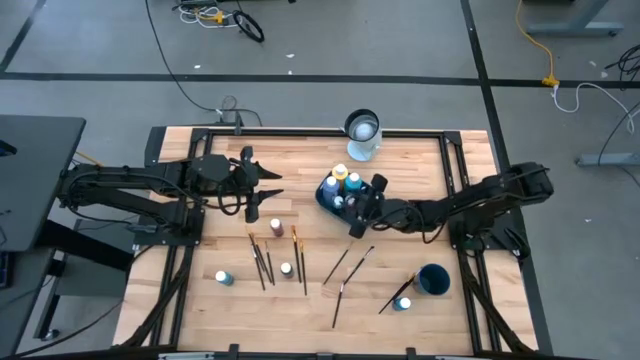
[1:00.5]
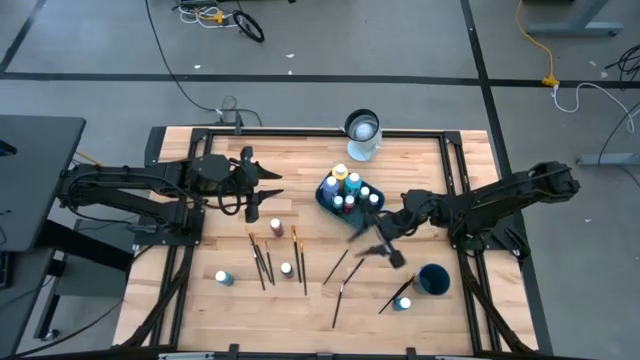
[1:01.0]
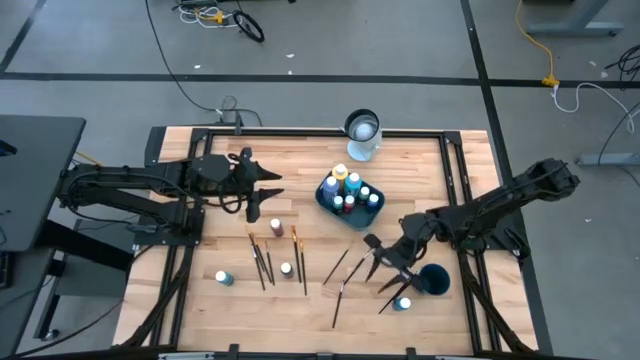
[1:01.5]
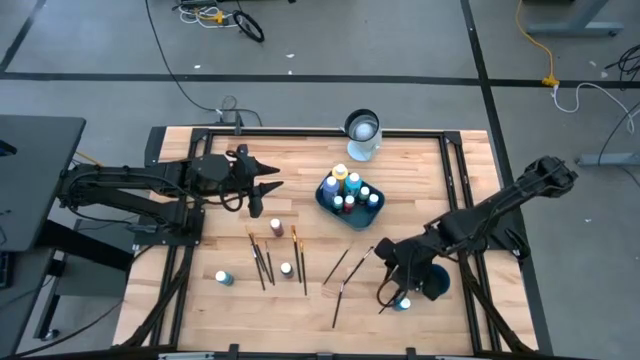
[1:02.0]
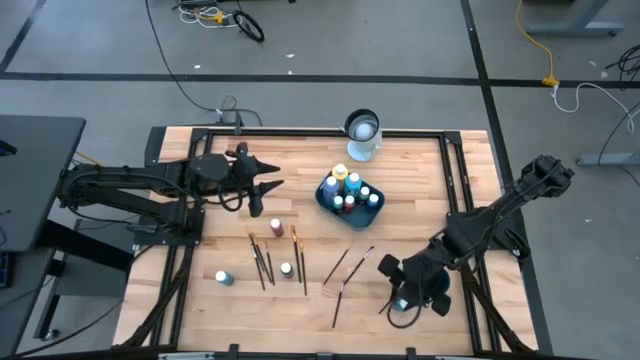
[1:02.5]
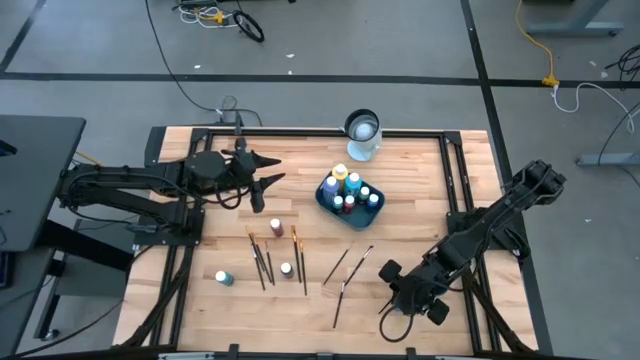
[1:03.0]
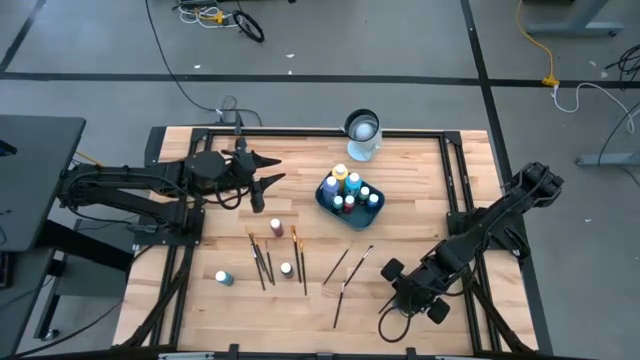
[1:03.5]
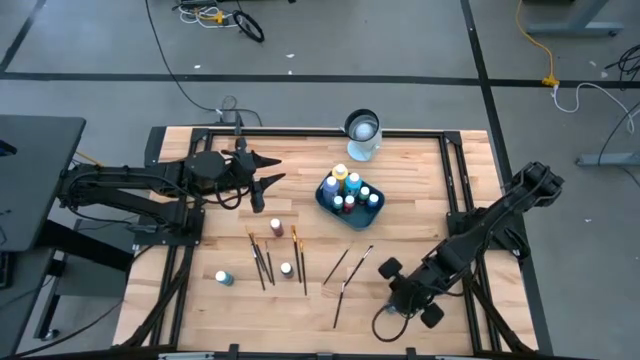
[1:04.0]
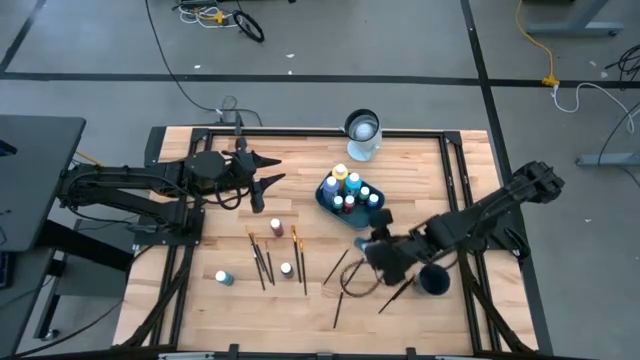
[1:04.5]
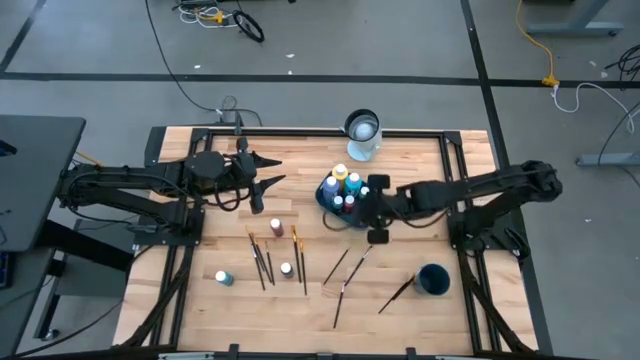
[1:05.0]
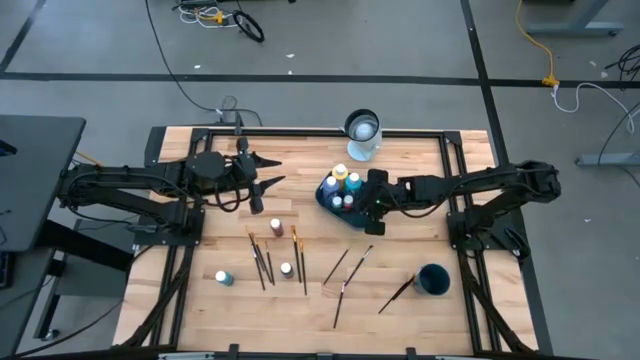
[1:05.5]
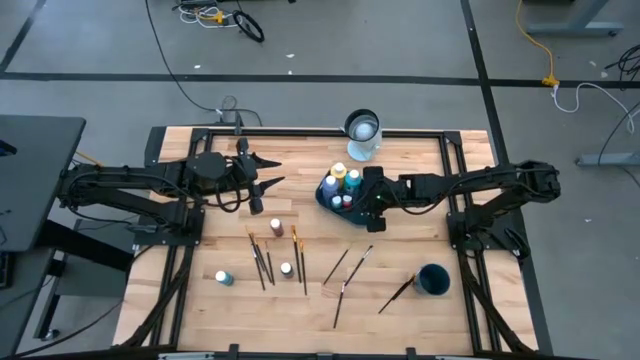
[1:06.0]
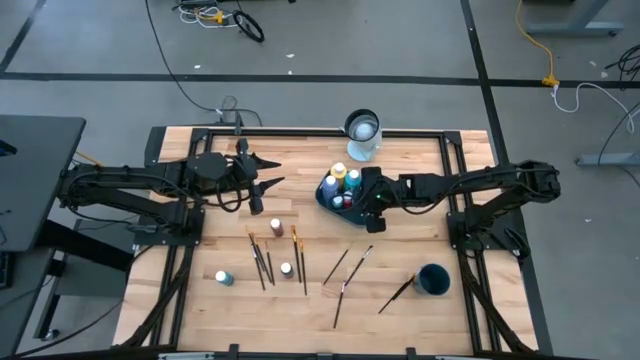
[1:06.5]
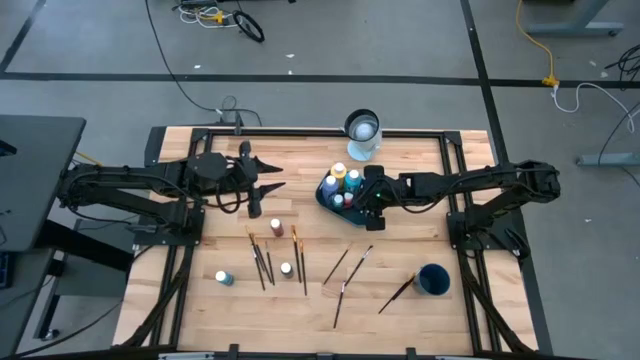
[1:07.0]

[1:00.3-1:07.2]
Task: Pick & Place Paint Supplies
Put the blue paint bottle into the green bin

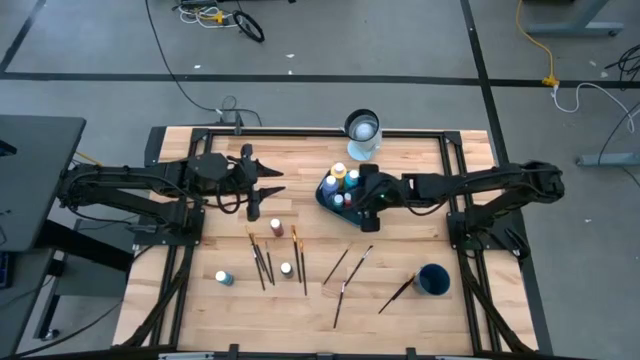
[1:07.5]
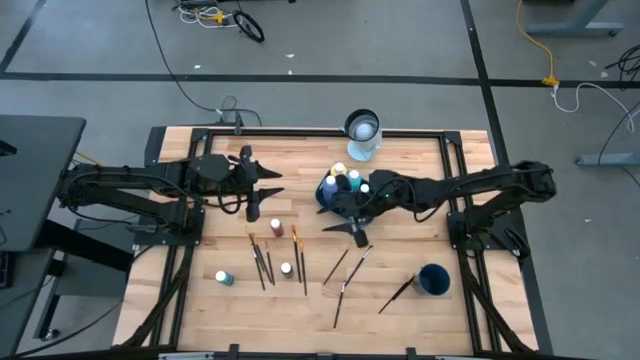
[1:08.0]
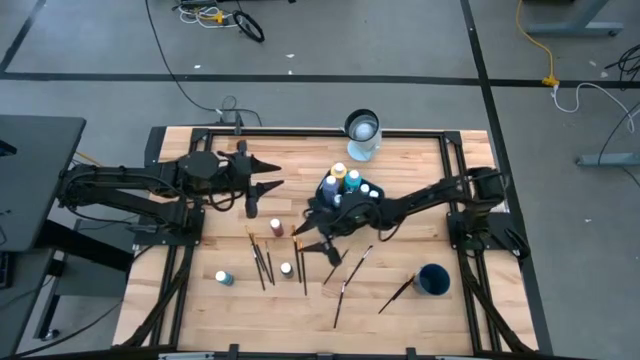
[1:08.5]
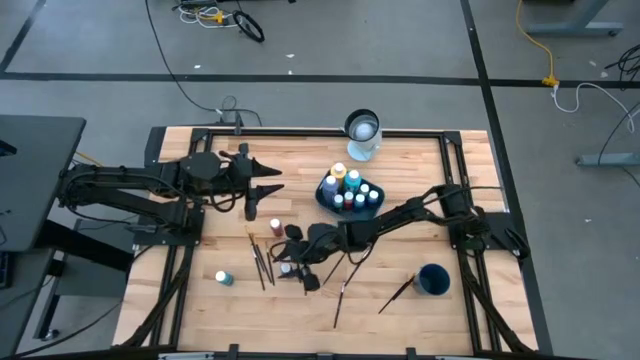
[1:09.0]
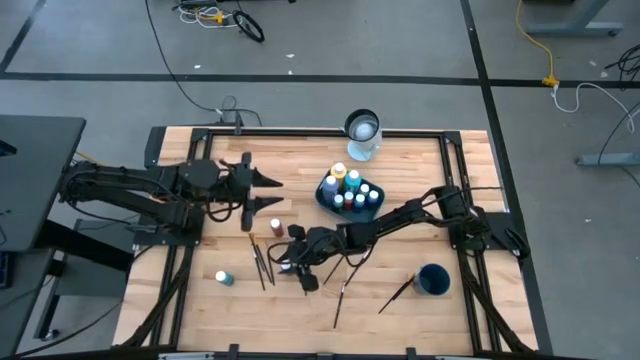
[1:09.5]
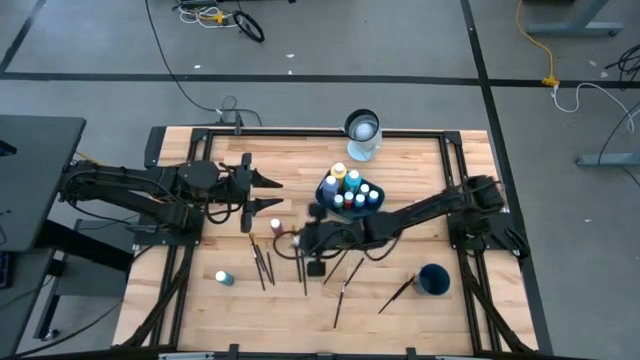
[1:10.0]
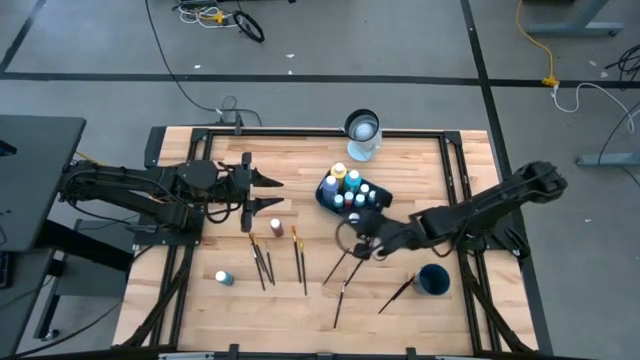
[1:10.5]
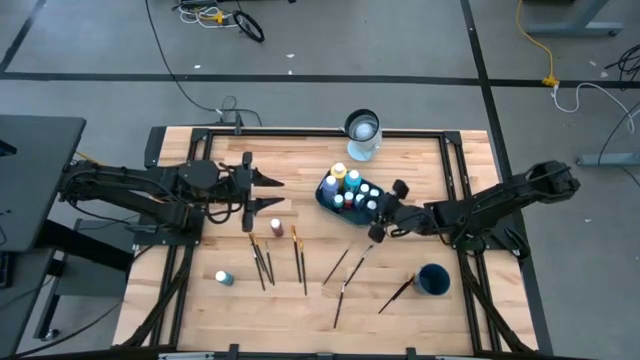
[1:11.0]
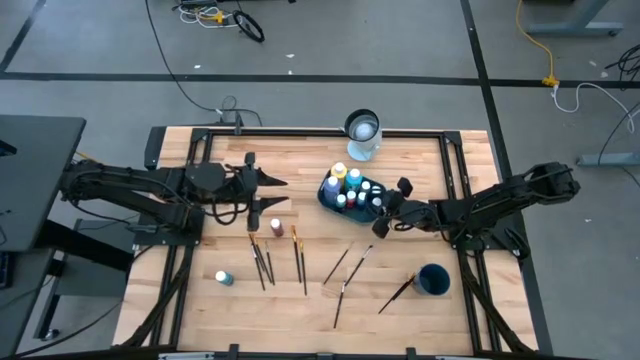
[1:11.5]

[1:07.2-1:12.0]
Put the black paint bottle into the green bin

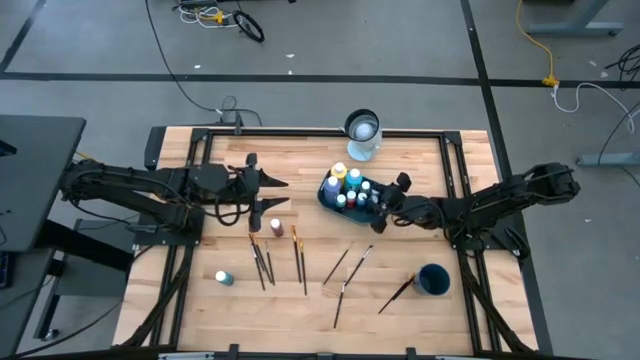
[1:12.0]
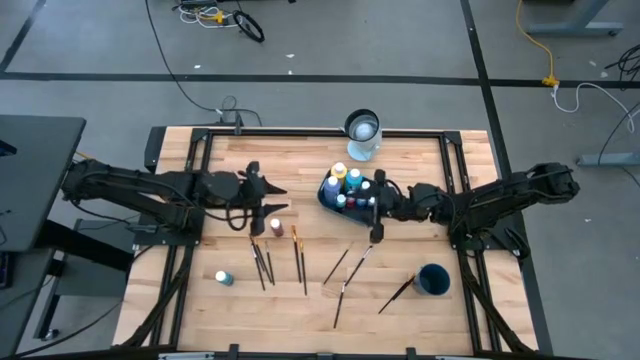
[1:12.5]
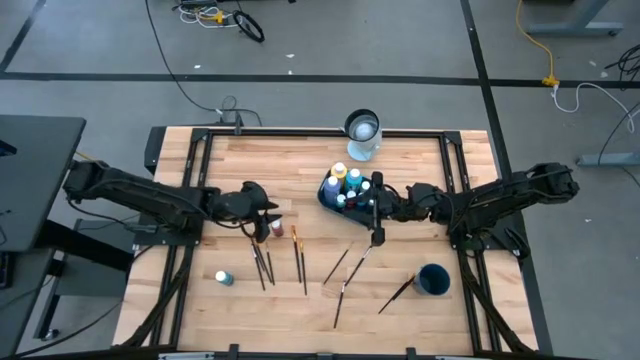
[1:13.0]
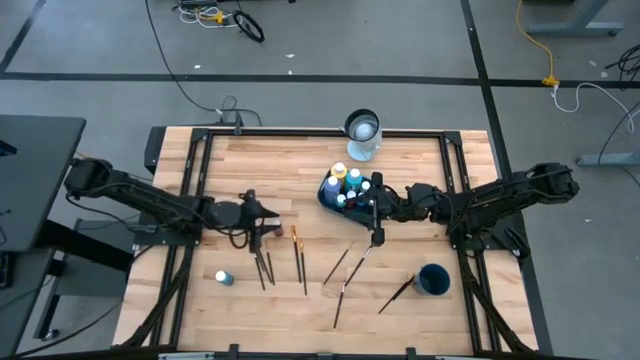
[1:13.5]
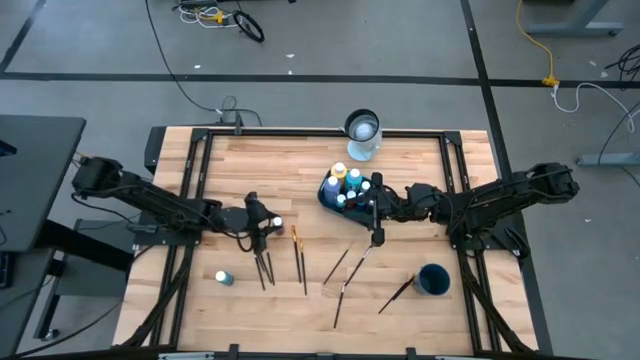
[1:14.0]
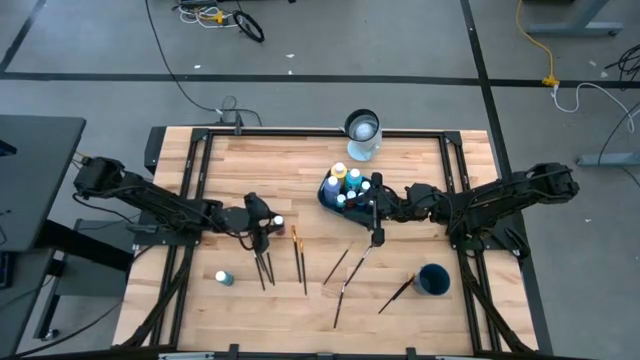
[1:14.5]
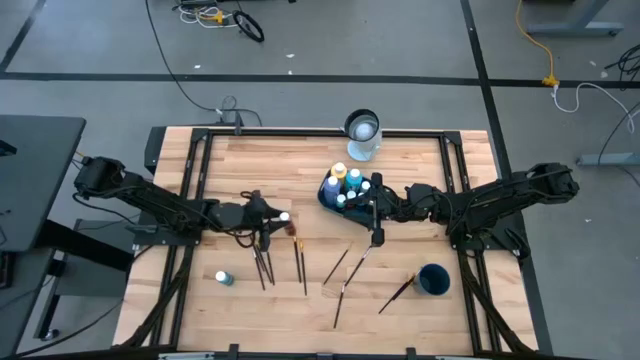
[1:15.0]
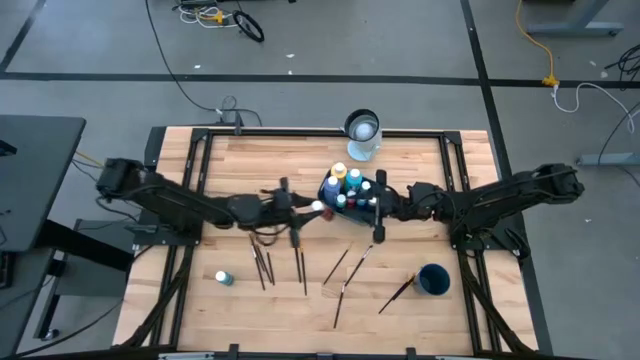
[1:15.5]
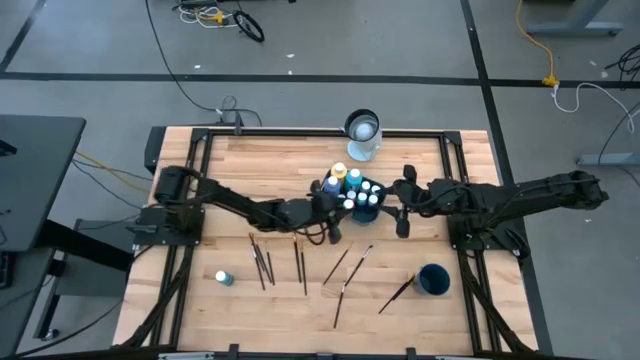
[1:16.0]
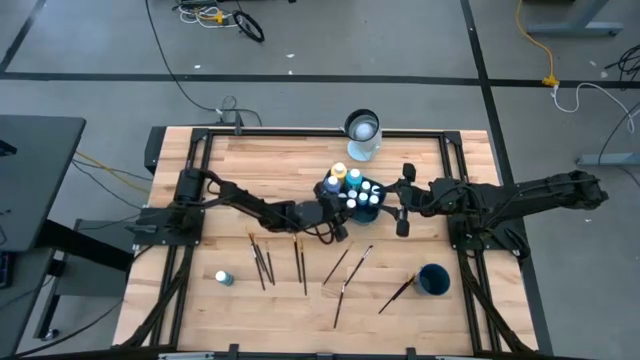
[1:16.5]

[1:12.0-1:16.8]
Put the red paint bottle into the green bin

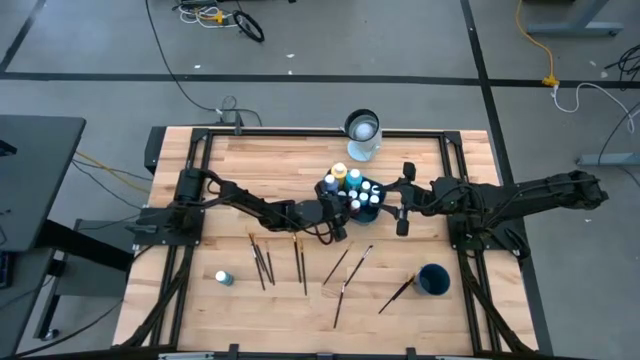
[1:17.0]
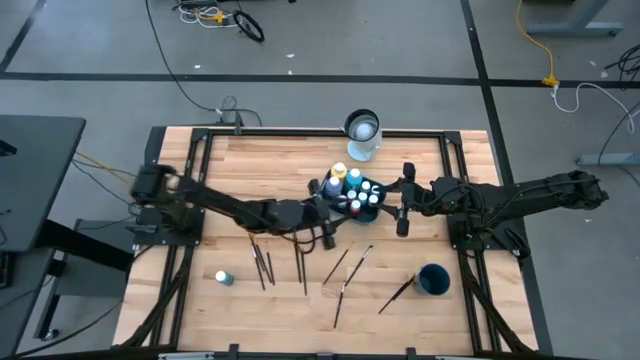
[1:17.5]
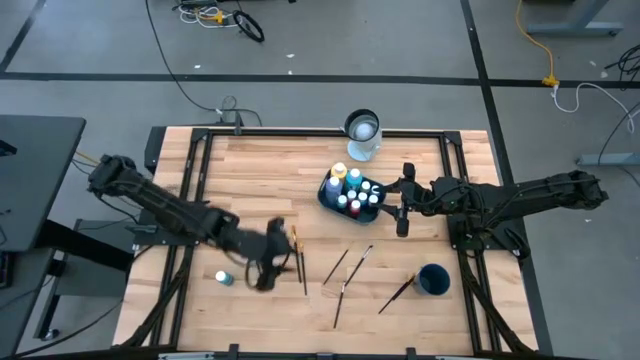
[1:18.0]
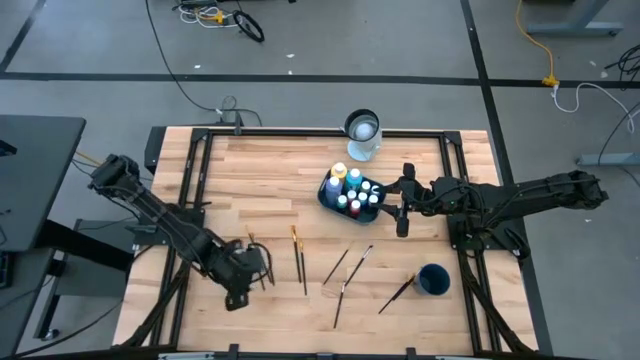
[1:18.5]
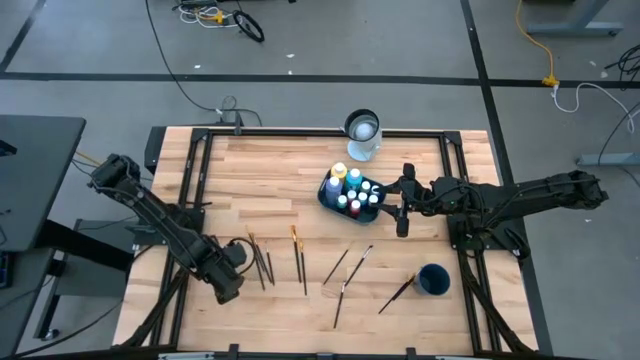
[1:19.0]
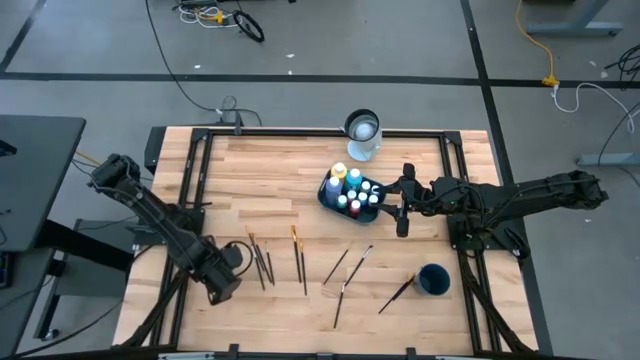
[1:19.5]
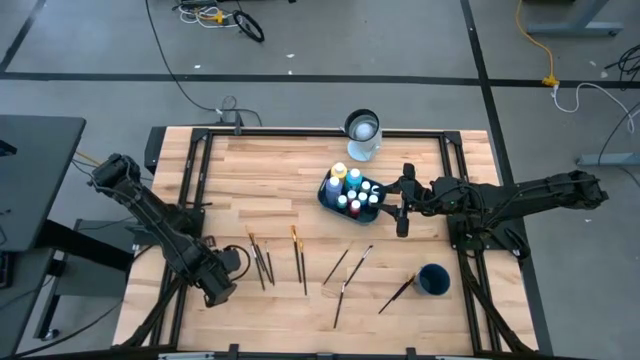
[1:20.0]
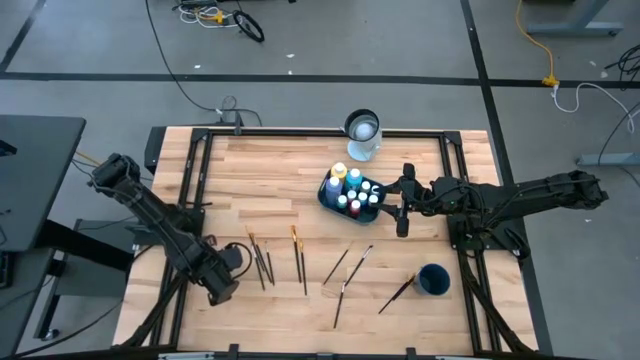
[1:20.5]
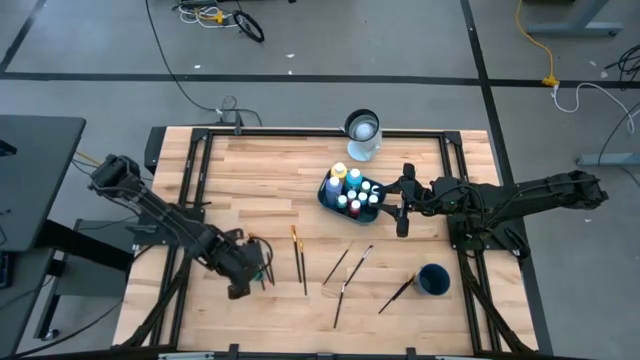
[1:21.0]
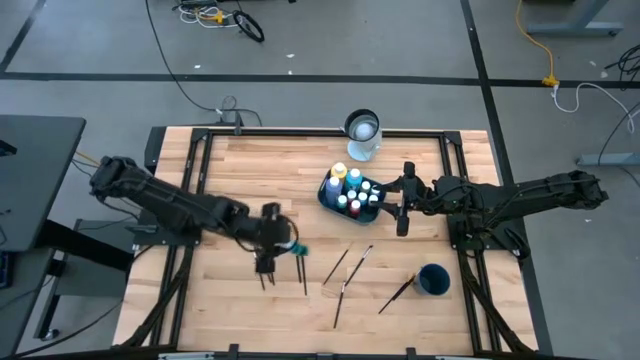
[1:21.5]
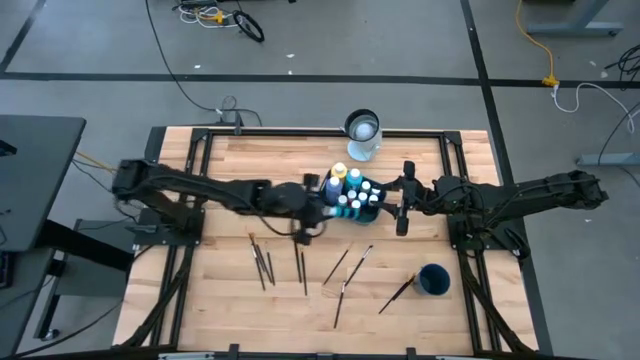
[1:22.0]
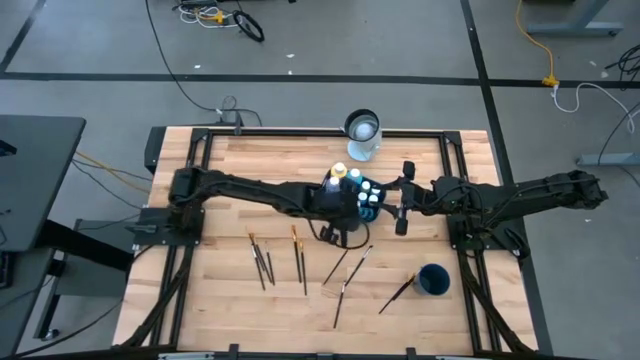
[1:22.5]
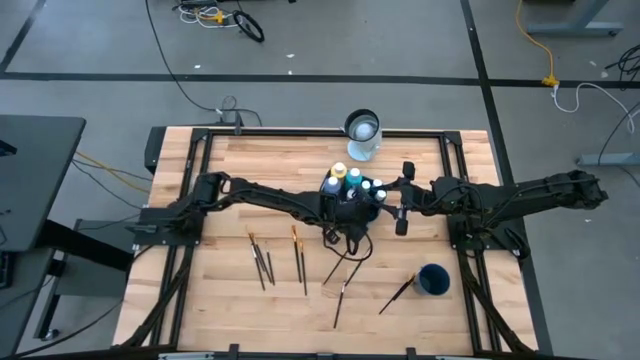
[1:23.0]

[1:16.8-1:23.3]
Put the small light blue paint bottle into the green bin
